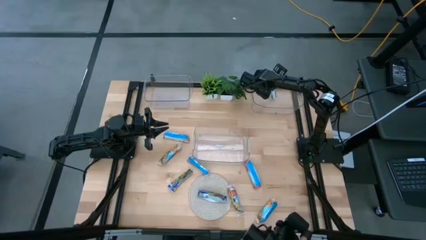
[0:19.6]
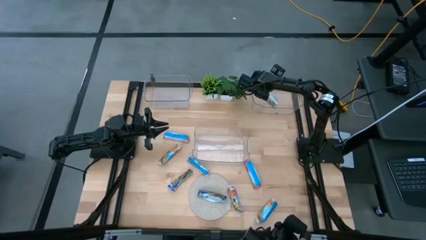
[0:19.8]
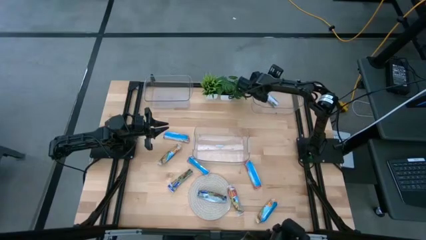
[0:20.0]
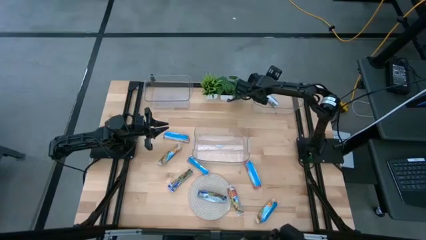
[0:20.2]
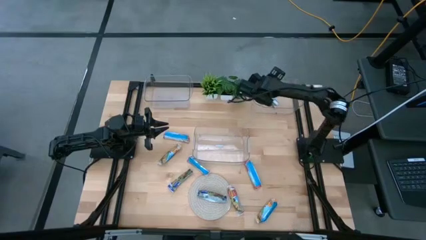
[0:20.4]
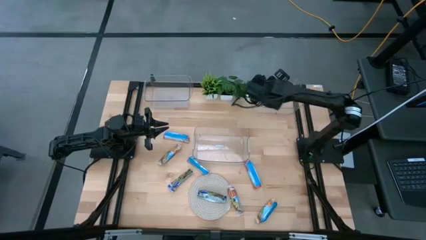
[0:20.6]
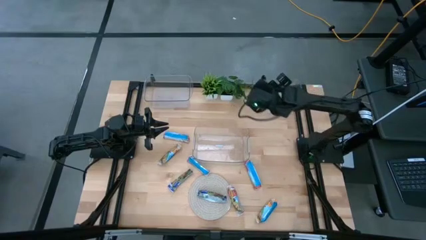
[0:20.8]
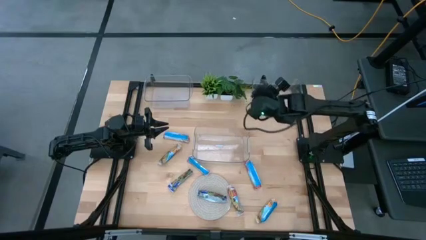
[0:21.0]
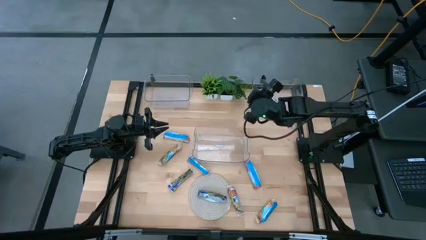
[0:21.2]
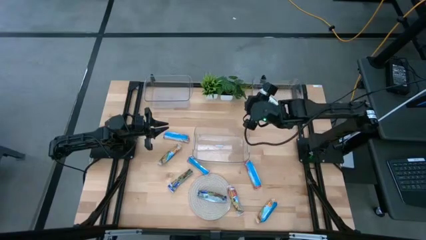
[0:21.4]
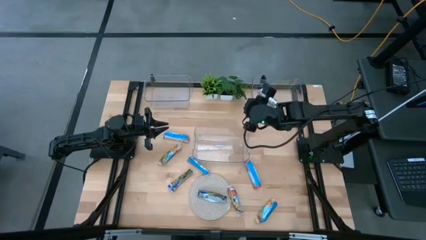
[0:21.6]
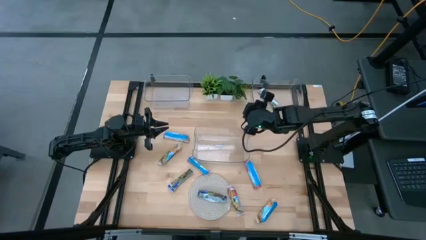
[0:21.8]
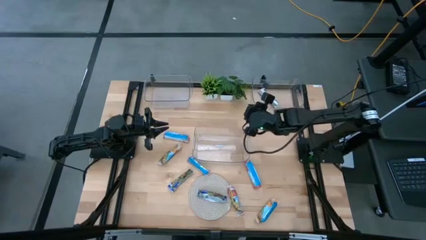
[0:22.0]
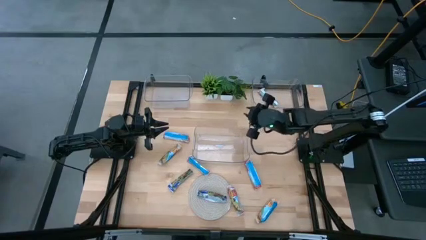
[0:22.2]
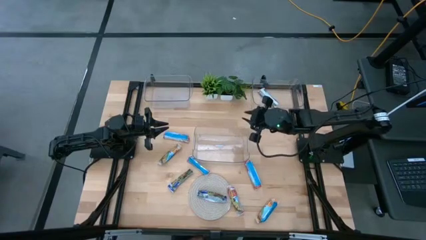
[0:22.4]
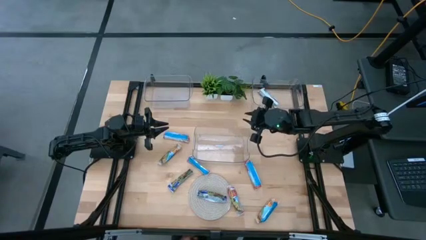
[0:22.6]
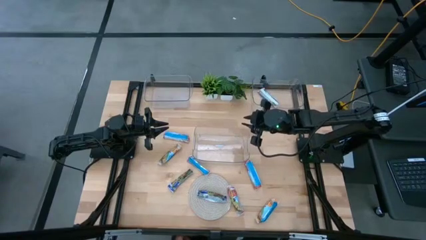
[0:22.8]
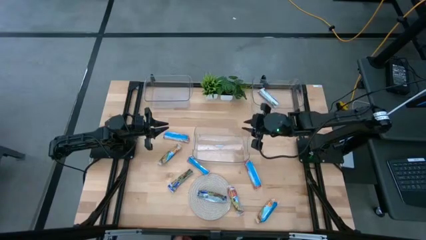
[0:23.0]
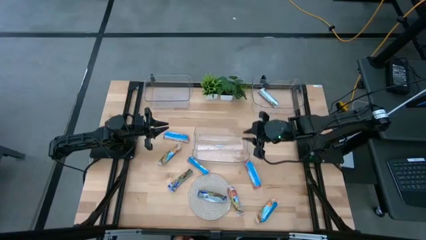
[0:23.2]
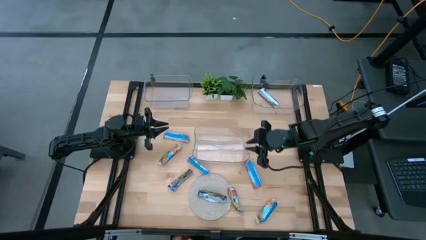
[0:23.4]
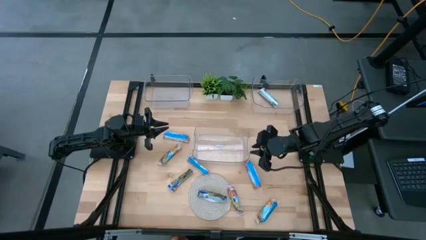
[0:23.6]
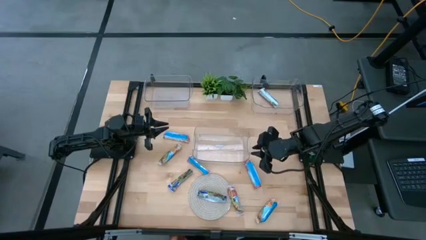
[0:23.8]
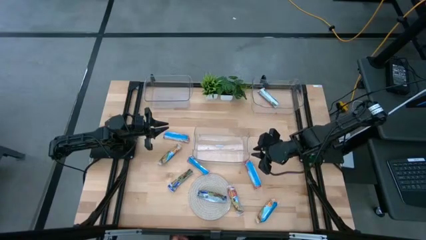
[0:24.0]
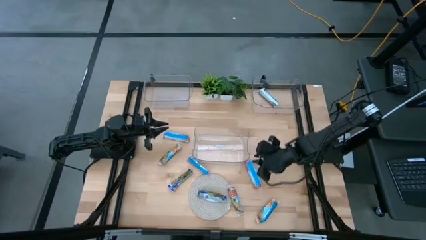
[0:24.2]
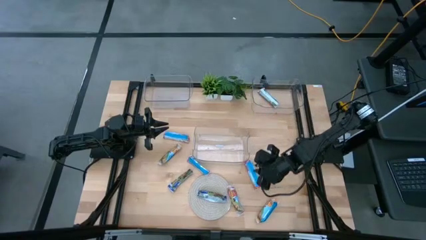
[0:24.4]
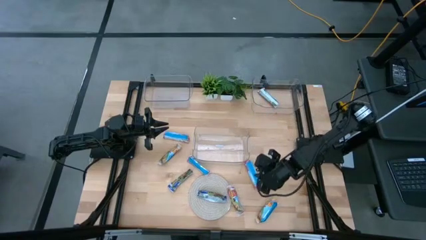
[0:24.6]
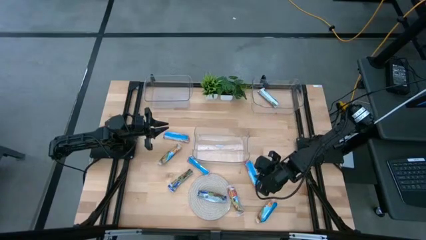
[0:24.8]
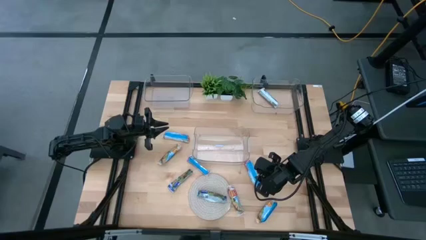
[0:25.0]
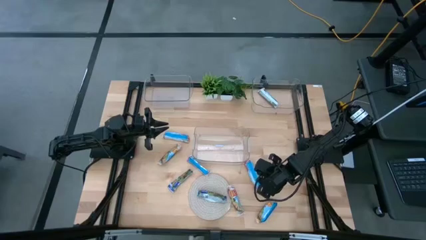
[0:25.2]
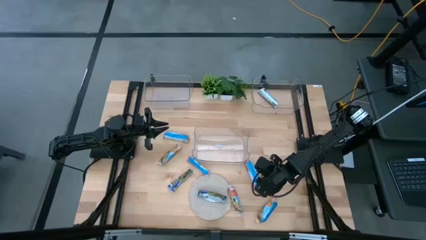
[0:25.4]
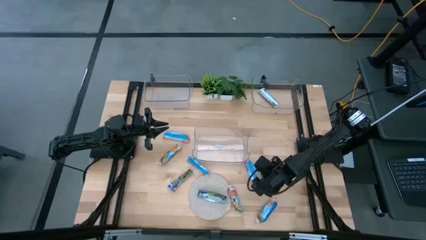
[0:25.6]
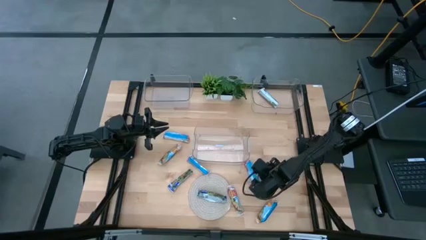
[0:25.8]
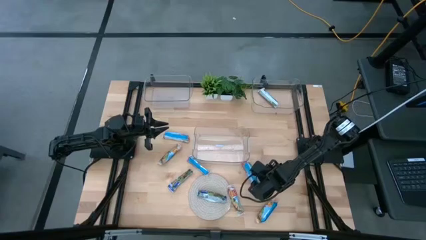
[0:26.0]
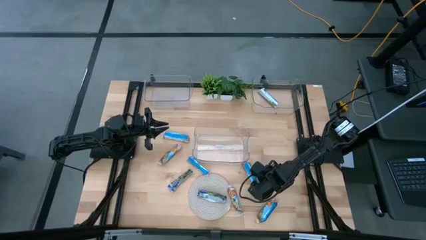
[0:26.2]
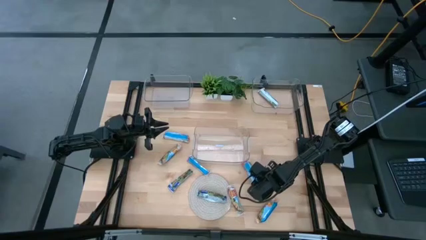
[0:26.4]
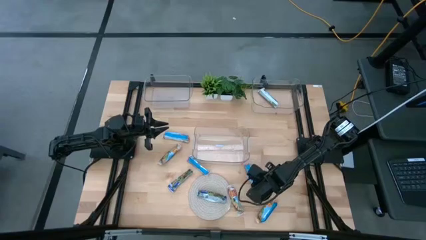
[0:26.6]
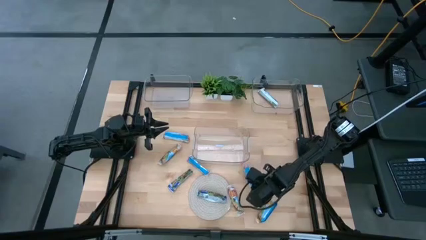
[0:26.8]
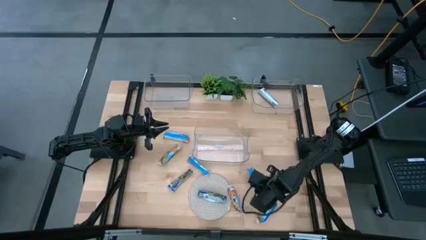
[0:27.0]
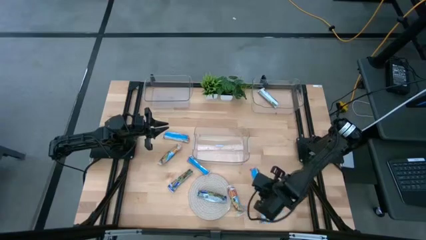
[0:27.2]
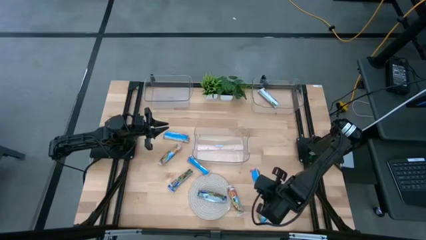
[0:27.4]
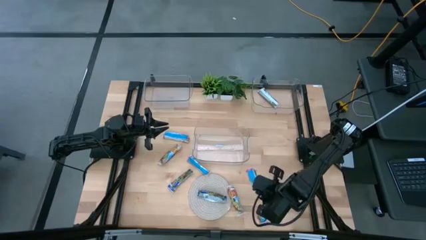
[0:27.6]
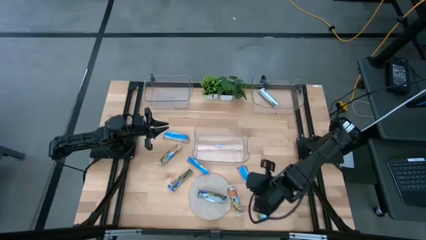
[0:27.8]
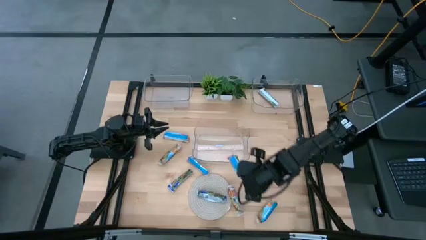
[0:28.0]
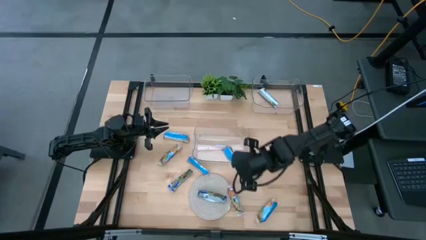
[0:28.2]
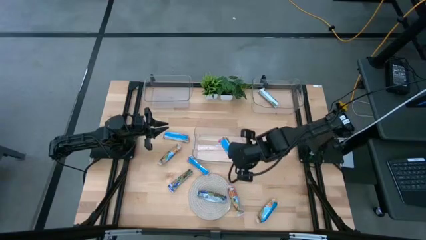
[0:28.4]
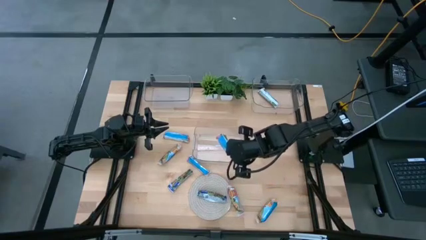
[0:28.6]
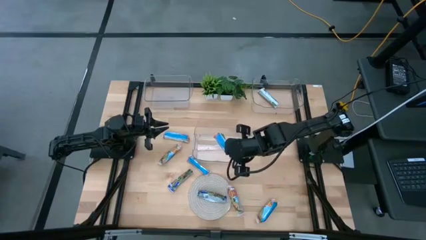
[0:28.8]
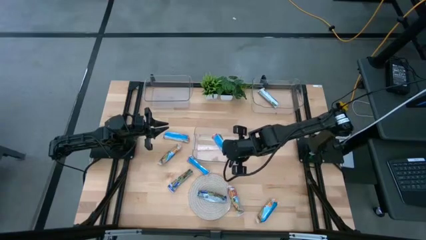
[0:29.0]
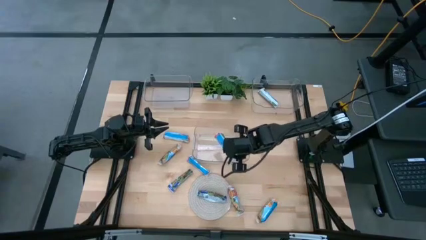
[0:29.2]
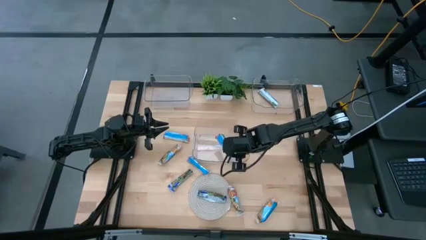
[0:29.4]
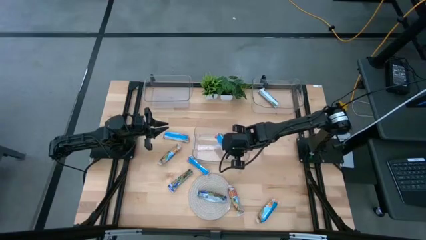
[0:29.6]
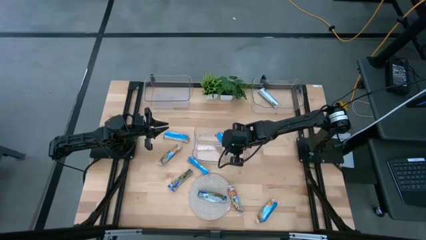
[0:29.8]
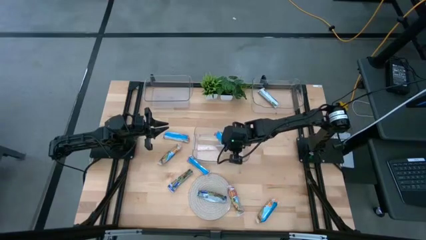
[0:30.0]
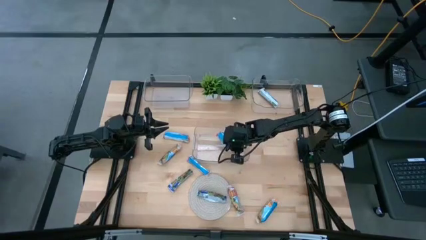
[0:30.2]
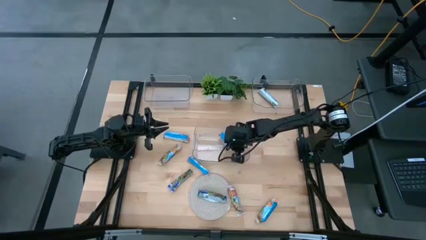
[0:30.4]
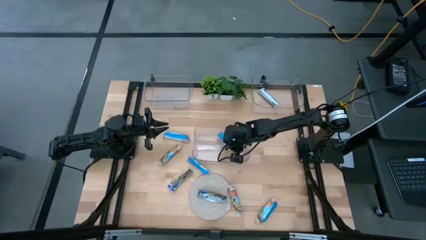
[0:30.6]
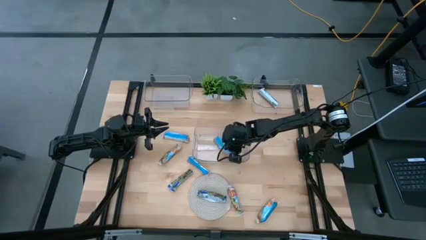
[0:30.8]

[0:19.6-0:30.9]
Task: Pick and place Granola Bars by type
Put the middle right red granola bar into the middle transparent bin
